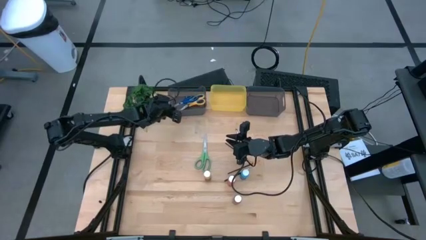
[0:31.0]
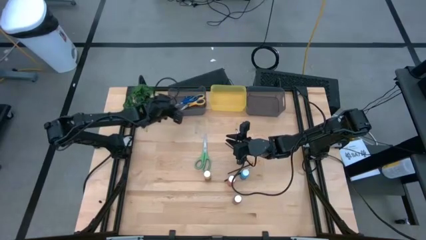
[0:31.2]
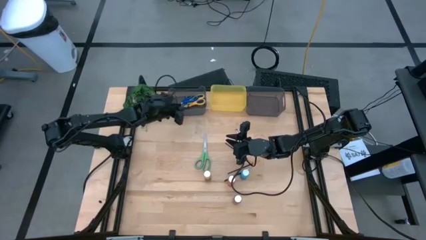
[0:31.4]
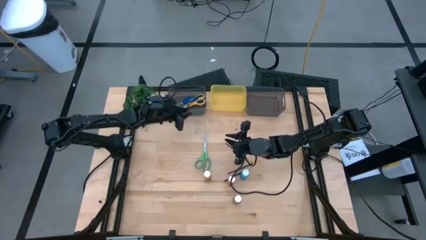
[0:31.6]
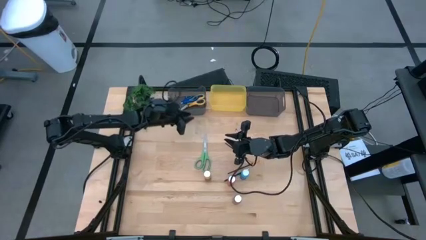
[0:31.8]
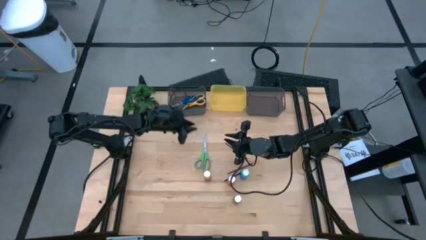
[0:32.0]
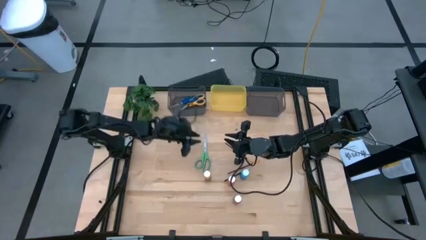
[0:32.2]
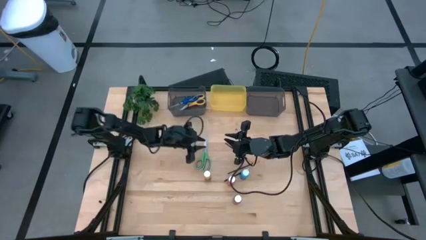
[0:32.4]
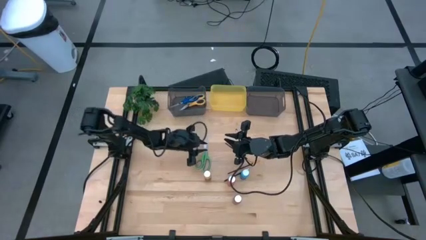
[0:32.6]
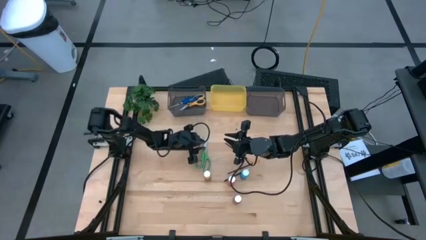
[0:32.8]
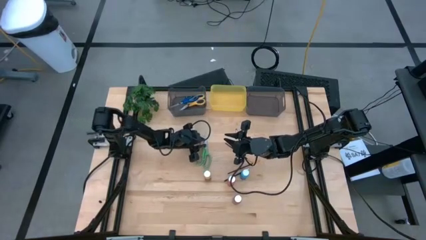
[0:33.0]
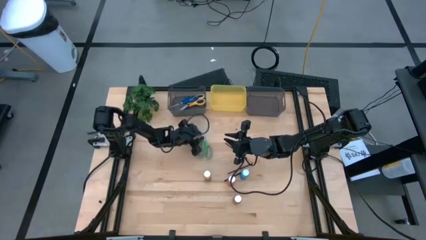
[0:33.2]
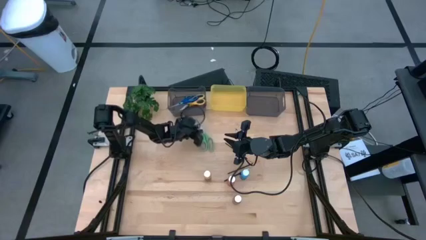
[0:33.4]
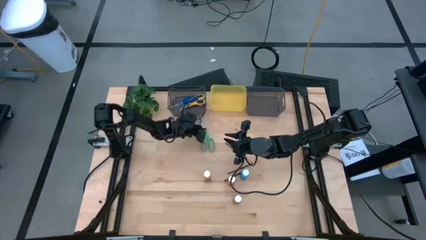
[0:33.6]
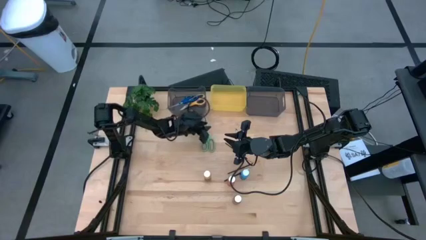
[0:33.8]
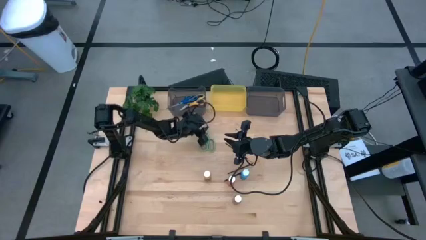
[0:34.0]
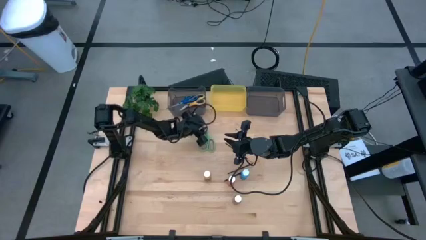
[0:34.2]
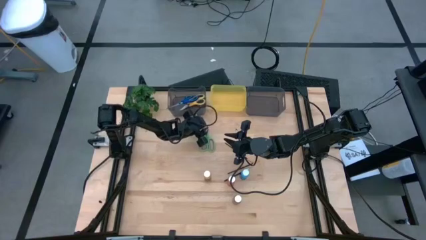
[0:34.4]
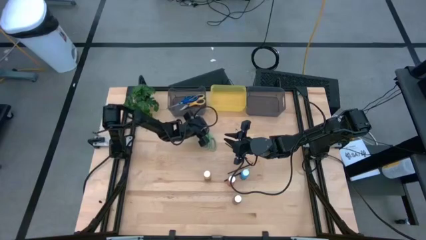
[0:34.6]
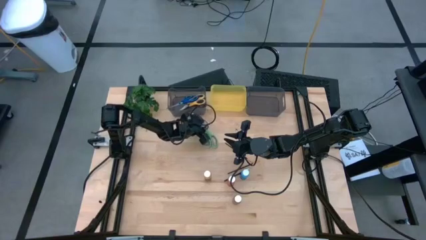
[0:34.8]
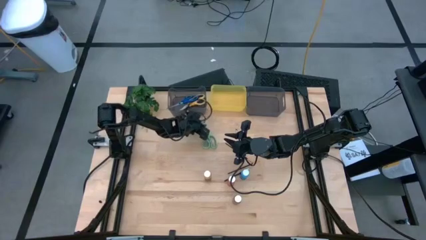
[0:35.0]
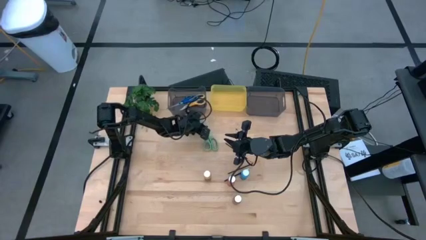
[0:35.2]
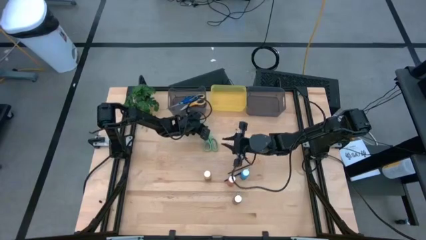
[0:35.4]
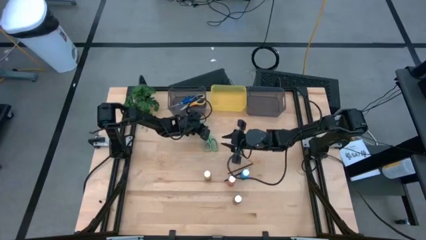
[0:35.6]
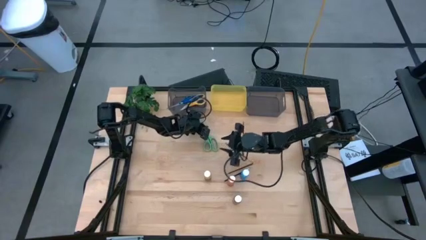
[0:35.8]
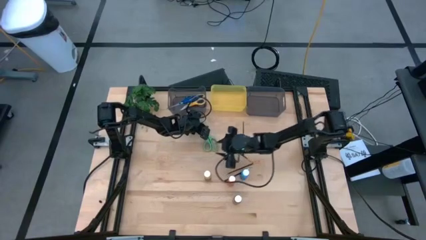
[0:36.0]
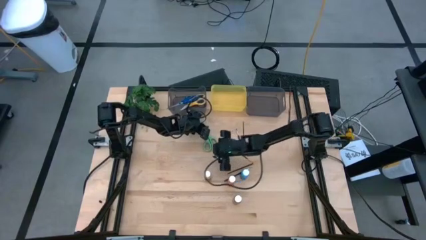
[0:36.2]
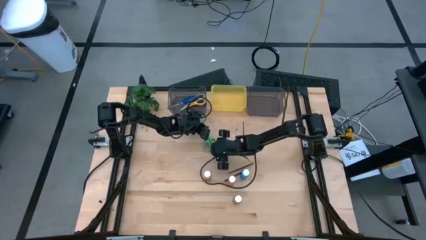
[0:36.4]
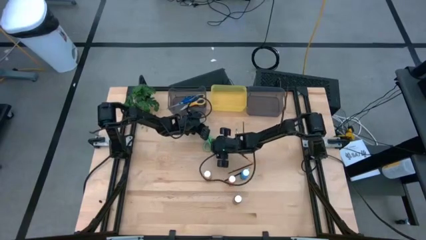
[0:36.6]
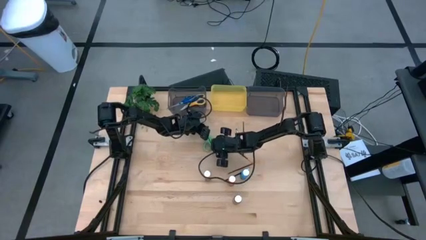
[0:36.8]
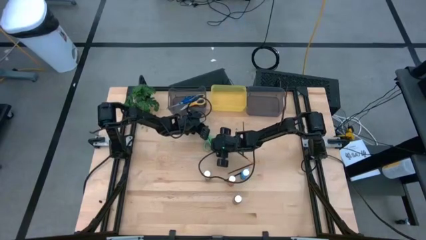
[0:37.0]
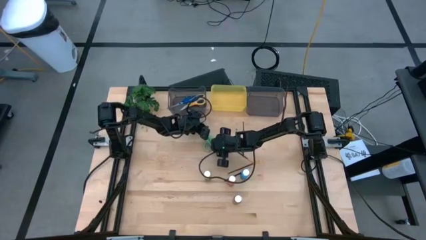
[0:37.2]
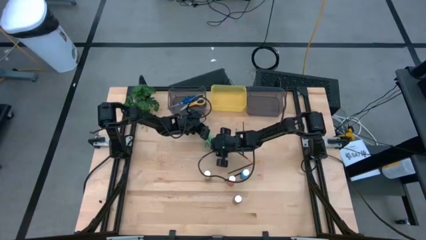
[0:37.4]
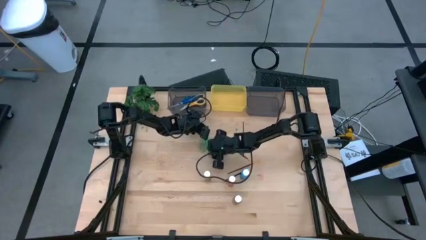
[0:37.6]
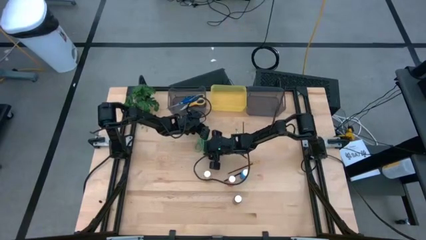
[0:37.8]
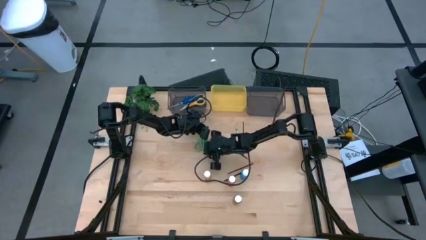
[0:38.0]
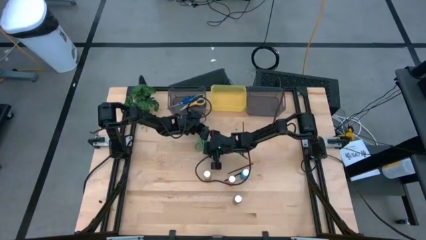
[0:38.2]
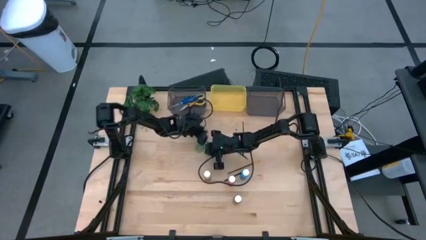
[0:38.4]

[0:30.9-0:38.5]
Task: Pick & Place Paint Supplies
Put the green scissors into the left black bin

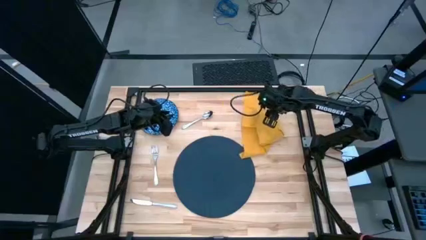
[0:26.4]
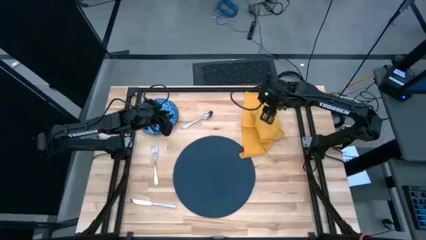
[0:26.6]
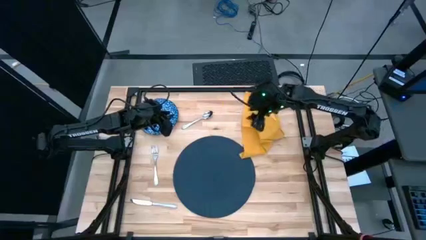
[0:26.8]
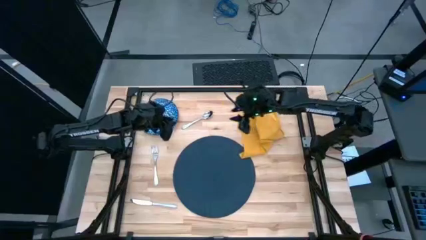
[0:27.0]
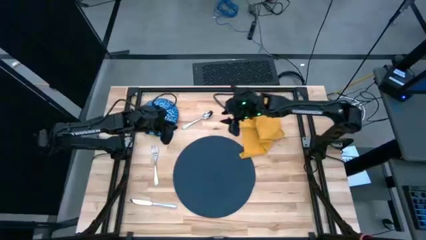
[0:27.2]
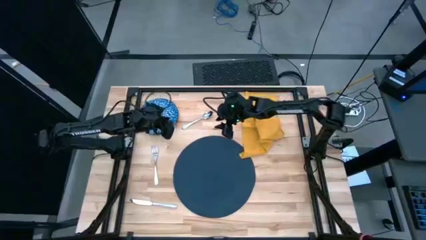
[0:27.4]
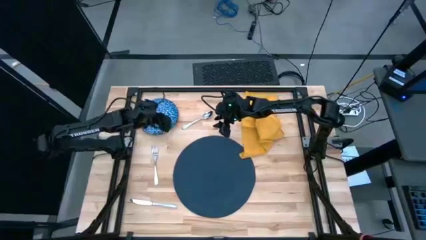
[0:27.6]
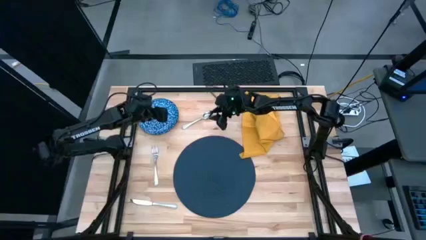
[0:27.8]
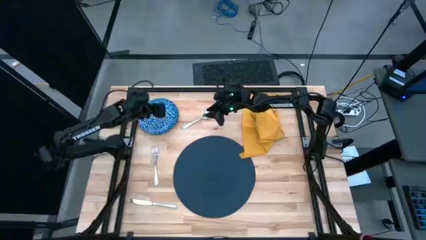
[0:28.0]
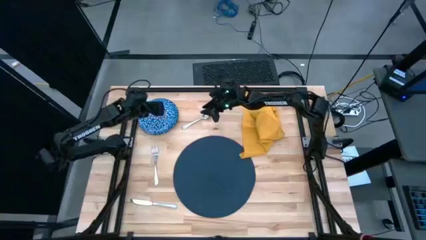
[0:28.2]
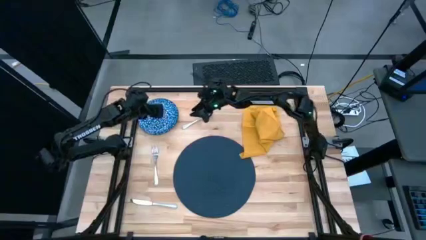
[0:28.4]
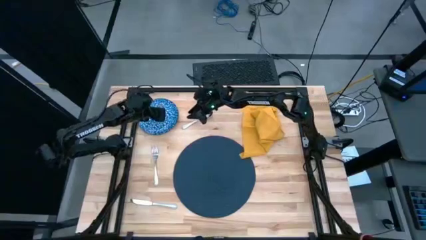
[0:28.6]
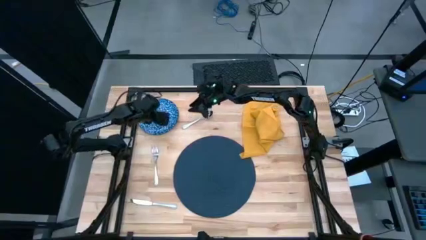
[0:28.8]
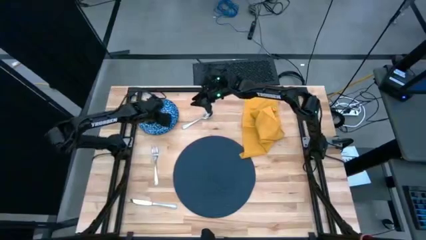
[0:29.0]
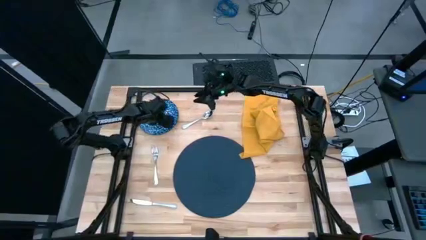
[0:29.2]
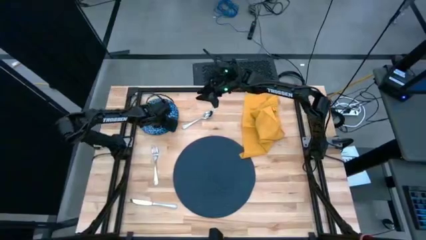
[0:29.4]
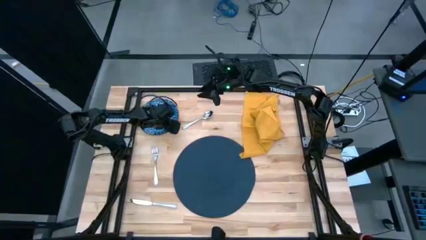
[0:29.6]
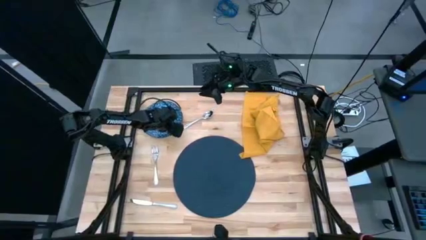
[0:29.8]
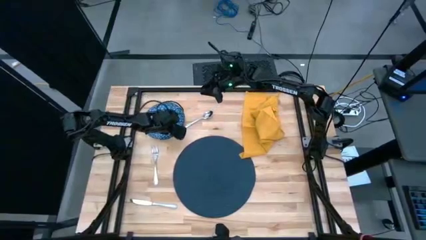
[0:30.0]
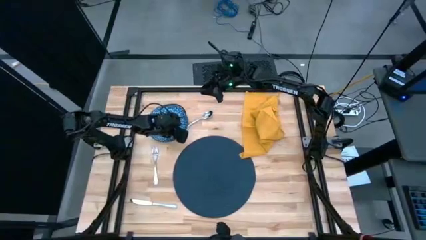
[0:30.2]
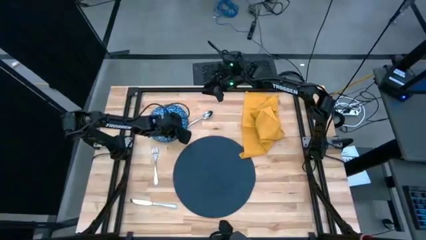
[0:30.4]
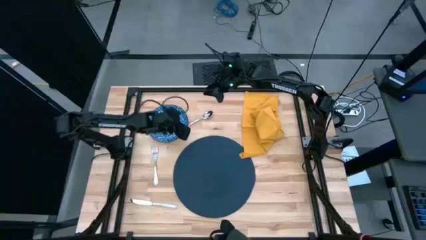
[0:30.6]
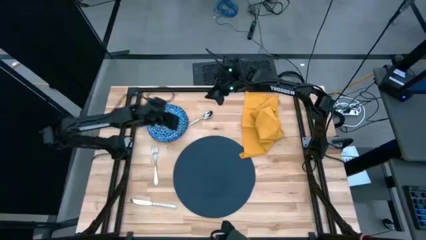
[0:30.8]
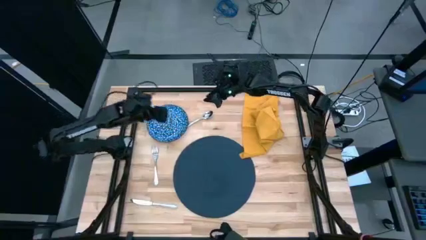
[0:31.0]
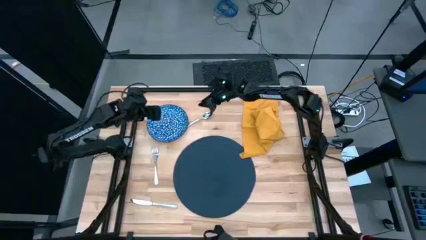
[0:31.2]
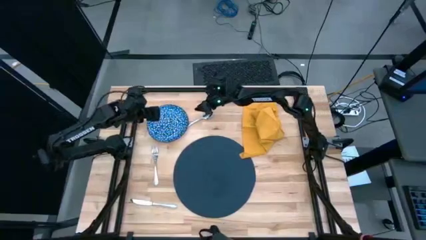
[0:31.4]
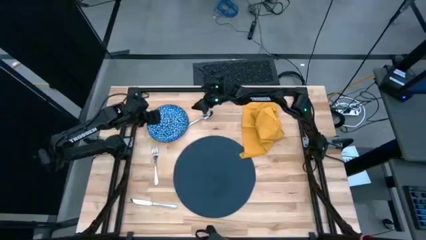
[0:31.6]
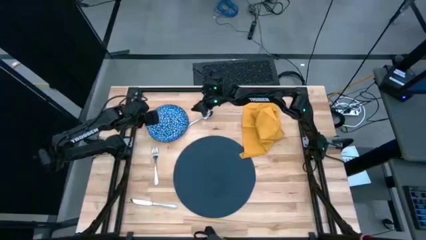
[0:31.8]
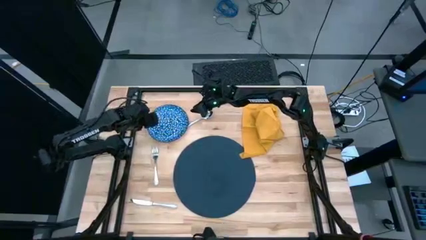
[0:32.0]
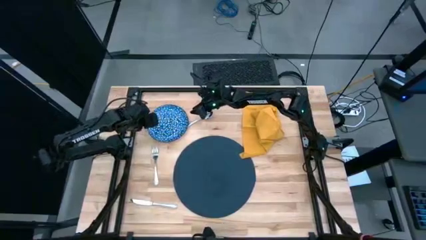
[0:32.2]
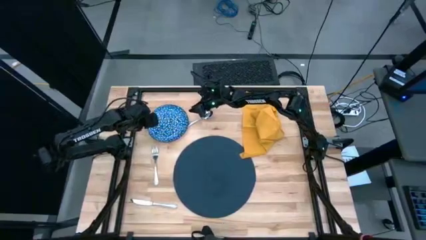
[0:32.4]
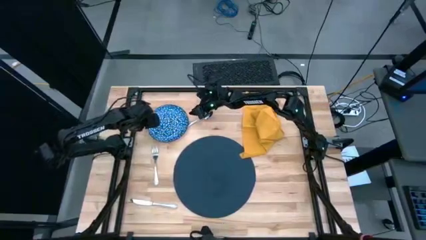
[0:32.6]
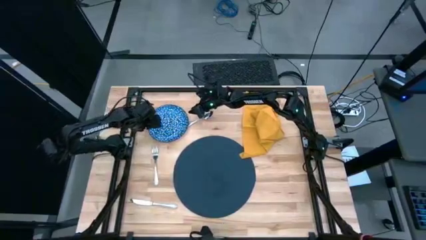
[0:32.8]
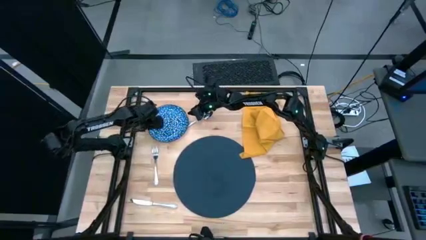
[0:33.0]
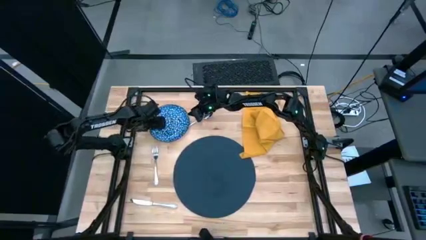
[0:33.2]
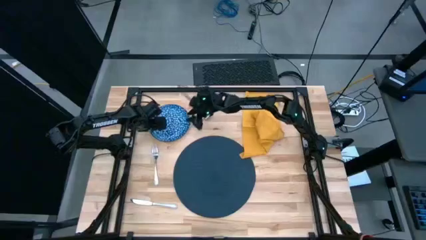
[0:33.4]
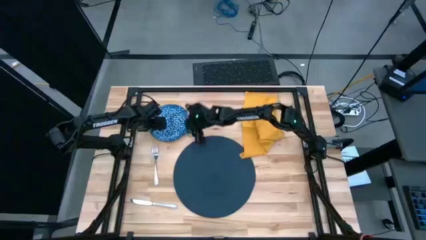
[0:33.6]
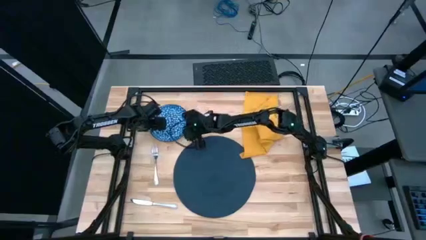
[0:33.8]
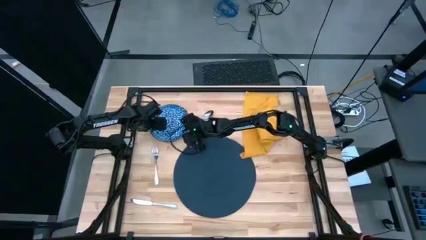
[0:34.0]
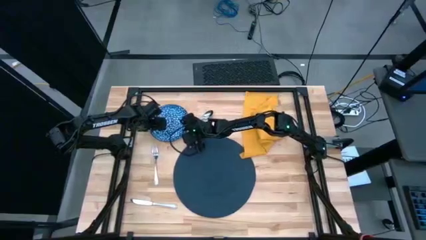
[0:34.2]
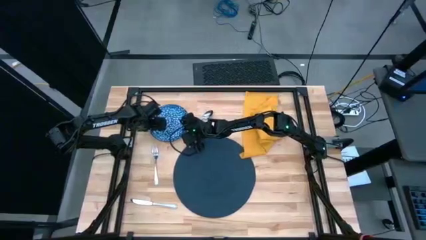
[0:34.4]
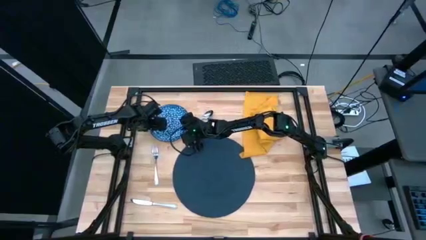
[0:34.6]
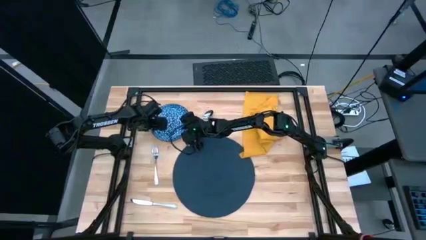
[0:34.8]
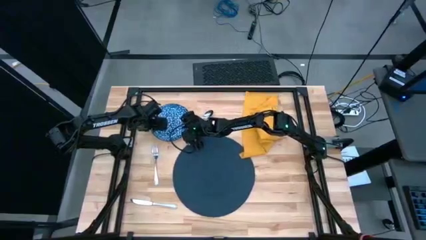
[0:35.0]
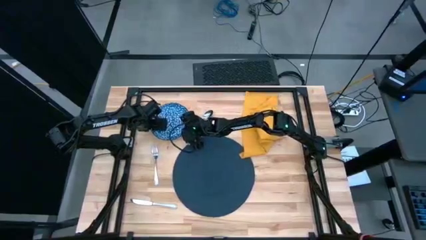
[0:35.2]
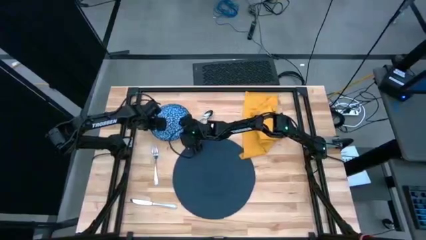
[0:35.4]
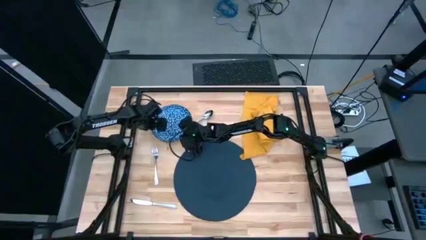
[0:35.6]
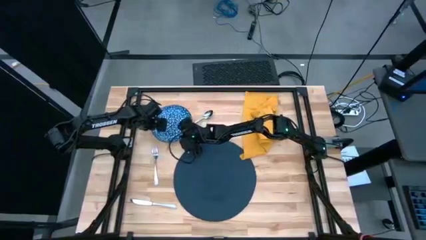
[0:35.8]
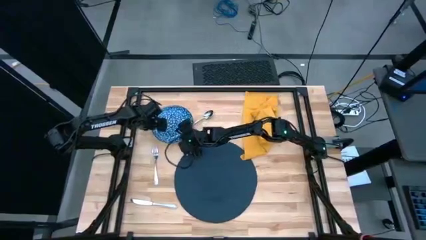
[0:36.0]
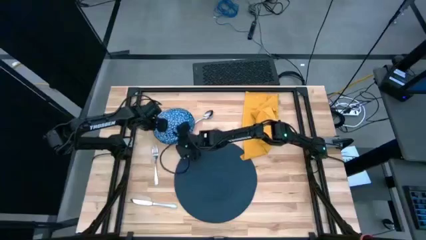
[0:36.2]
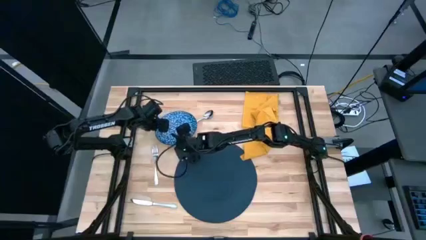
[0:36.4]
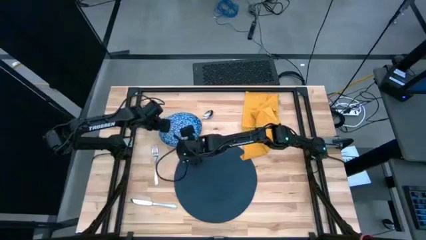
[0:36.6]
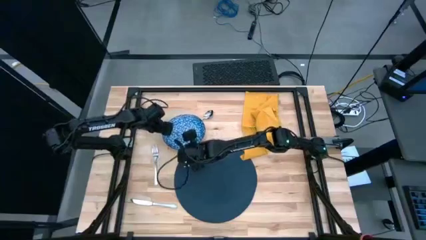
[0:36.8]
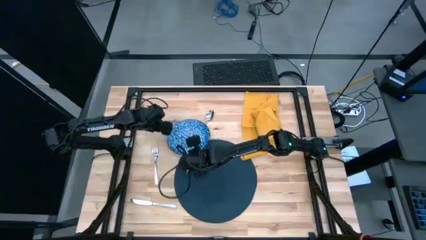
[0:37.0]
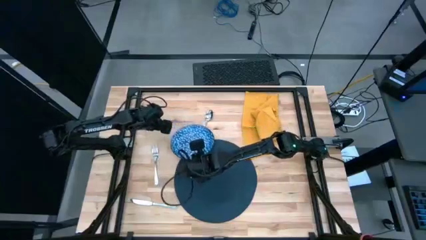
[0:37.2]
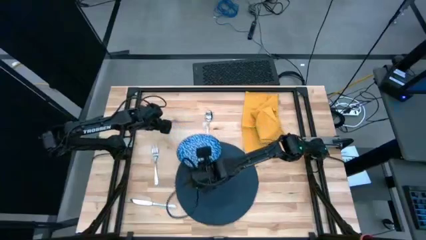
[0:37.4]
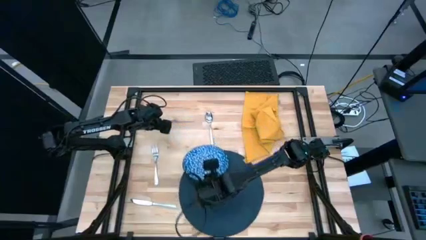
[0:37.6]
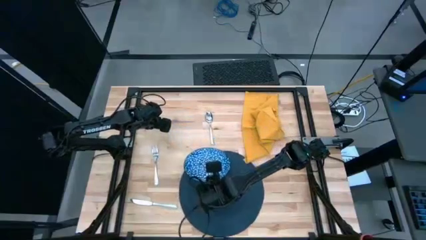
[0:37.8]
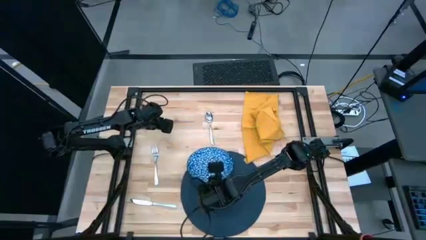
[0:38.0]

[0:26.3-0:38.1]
Task: Set table place
Put the blue plate on the blue table mat
